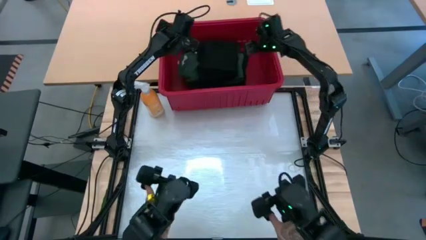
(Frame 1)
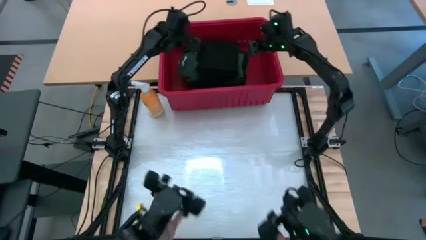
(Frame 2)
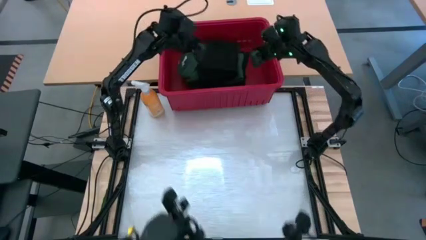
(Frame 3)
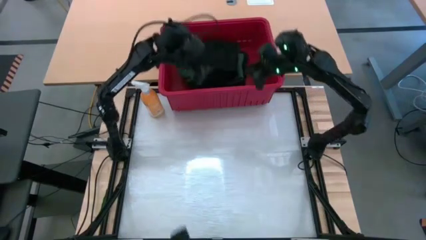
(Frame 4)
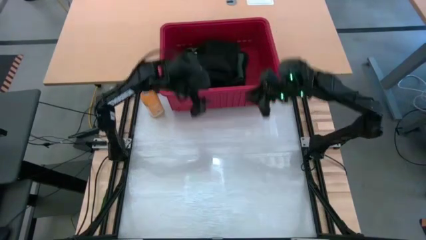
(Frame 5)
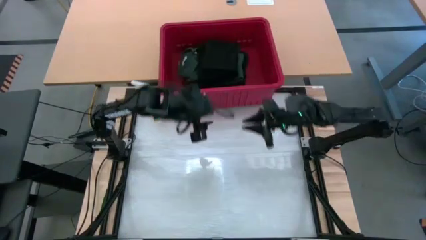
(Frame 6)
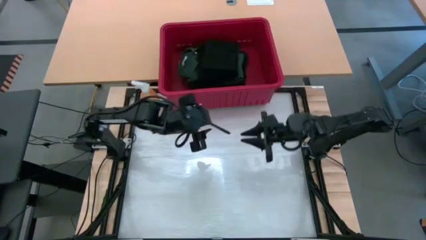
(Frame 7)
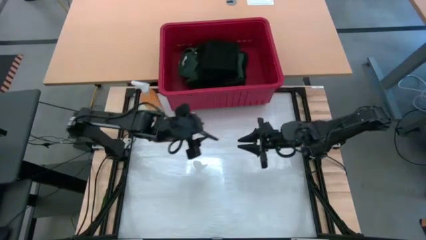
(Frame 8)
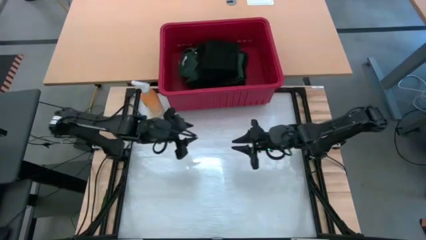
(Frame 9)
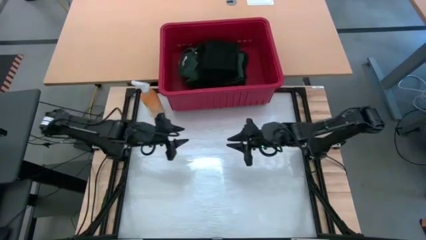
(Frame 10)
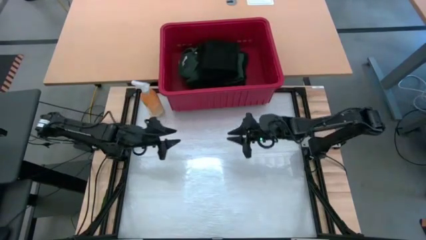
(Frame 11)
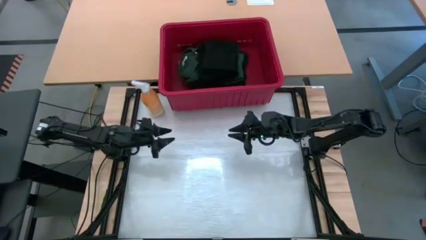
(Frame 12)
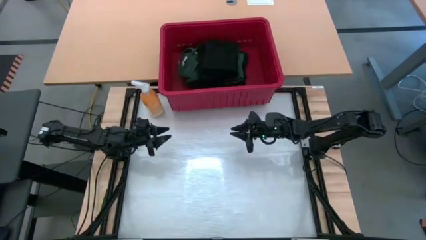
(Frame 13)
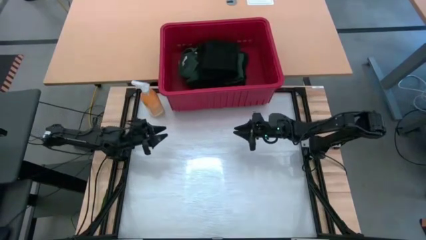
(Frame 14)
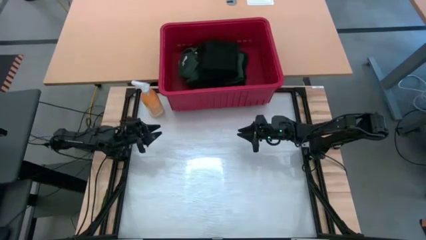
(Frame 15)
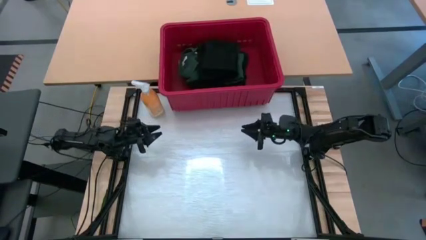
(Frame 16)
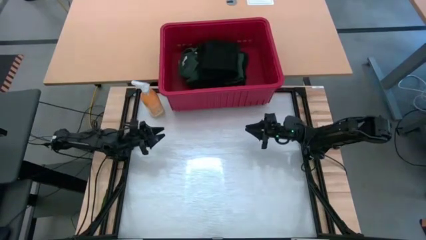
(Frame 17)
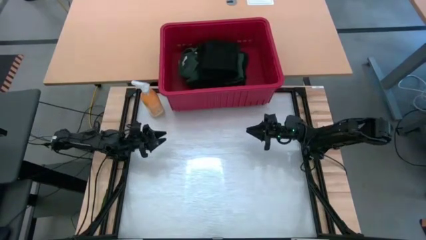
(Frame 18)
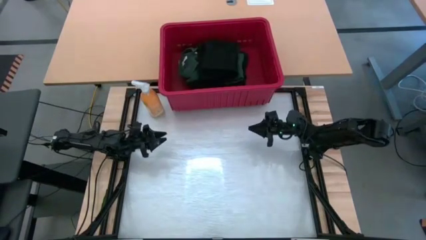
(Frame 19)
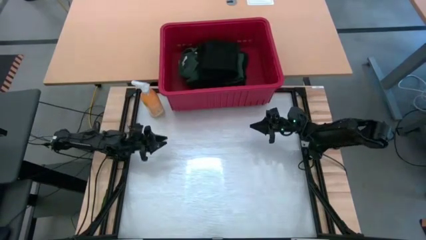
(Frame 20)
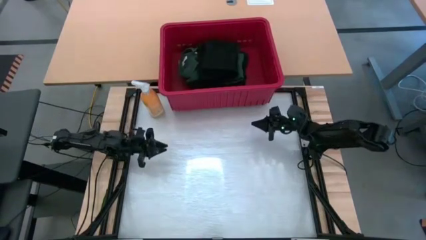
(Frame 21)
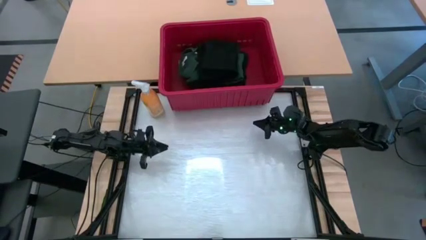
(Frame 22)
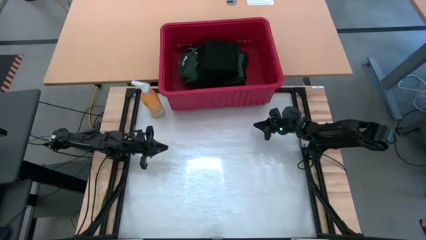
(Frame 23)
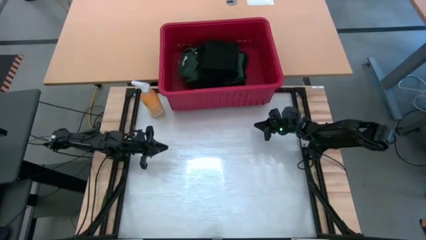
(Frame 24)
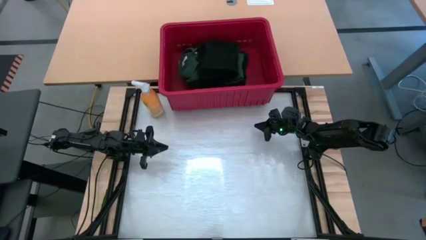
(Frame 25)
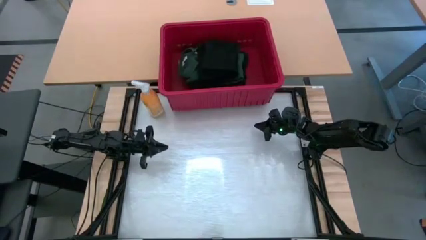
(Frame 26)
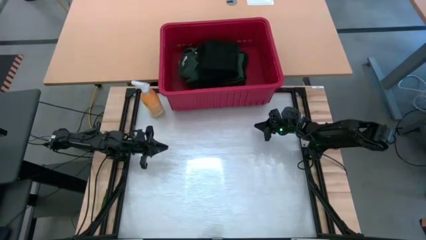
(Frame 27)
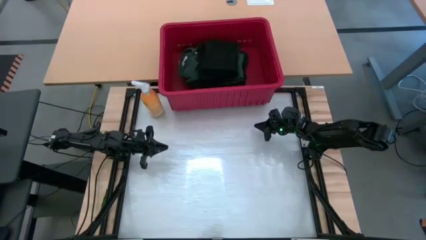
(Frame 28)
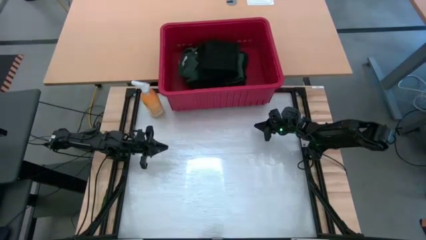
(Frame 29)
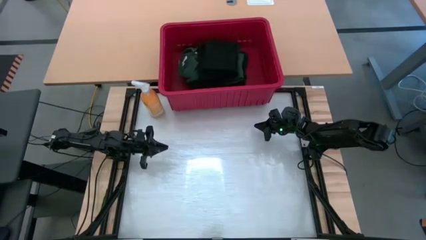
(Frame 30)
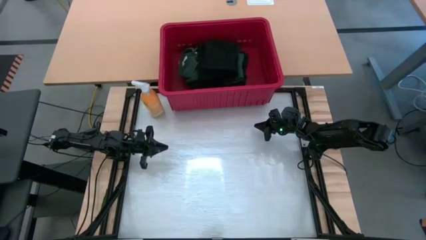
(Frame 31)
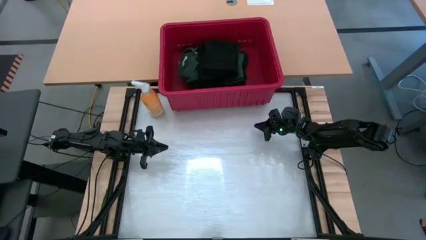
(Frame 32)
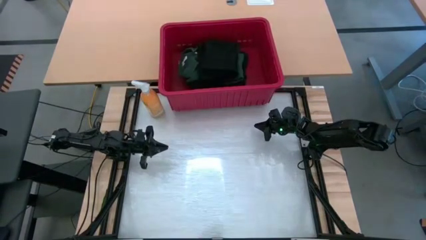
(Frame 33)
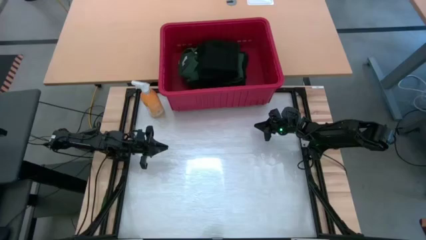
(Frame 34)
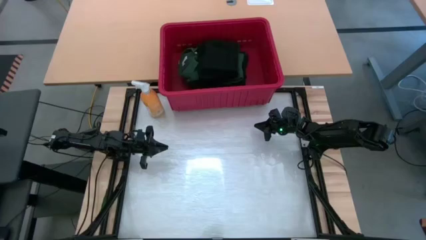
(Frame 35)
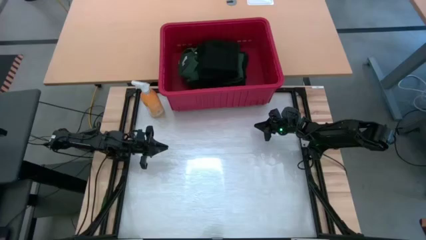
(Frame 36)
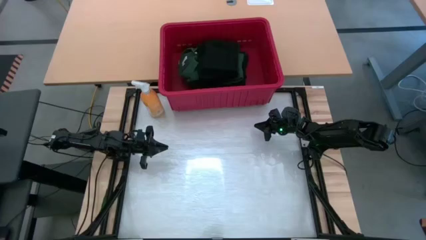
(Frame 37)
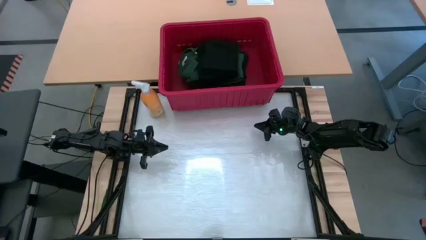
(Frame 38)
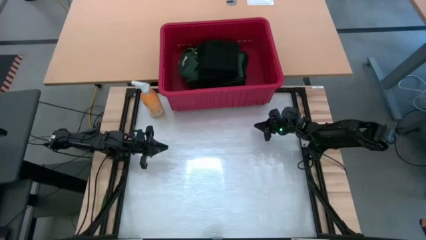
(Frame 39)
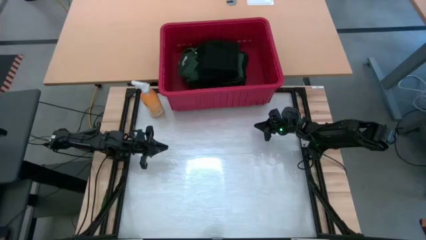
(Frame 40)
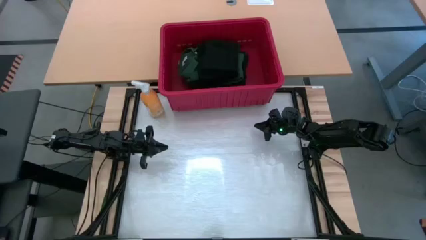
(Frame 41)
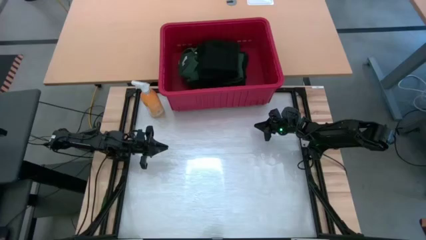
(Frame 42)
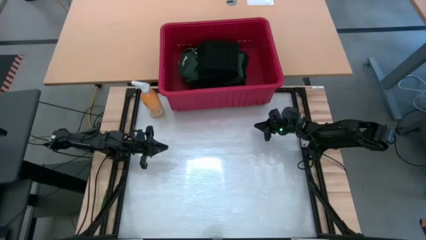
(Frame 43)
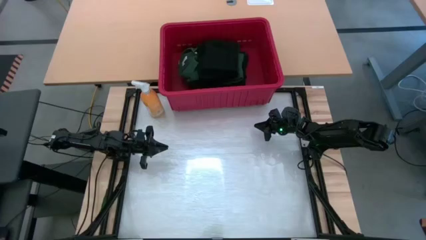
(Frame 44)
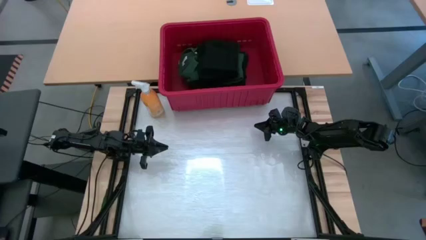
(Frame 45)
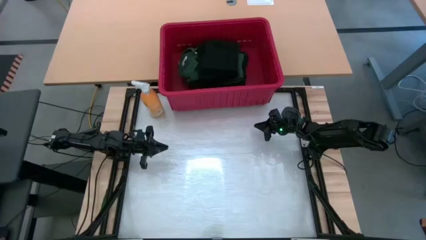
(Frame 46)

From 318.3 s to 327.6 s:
Task: Fold laundry
Return to Home Position

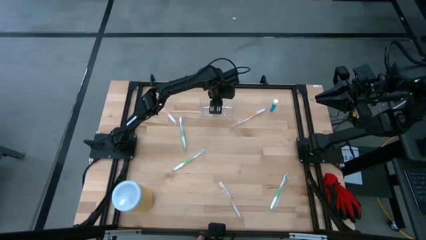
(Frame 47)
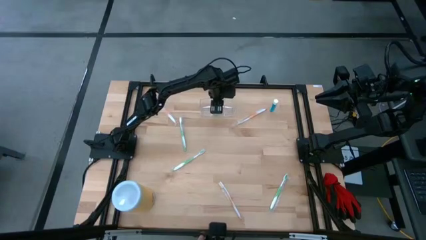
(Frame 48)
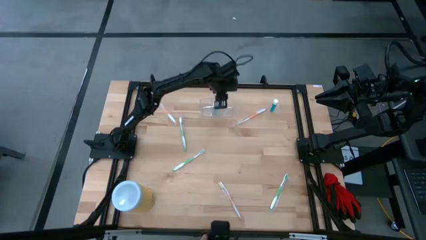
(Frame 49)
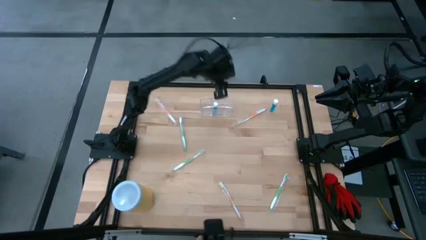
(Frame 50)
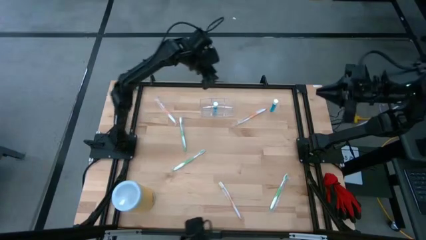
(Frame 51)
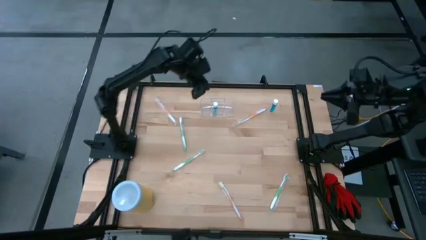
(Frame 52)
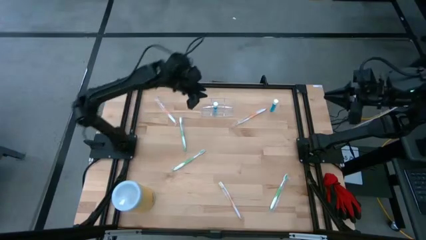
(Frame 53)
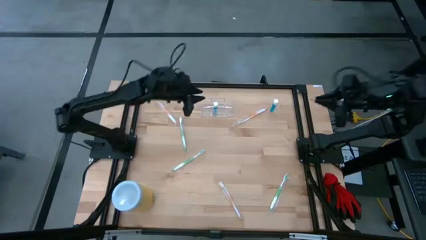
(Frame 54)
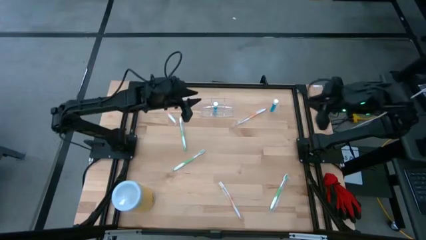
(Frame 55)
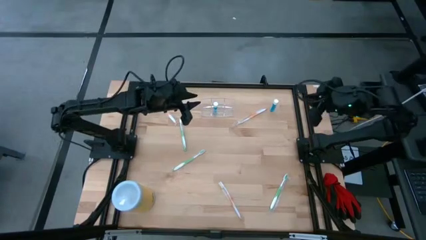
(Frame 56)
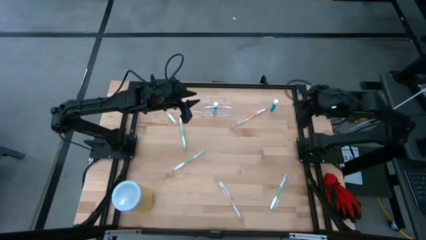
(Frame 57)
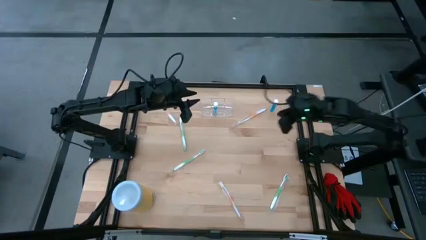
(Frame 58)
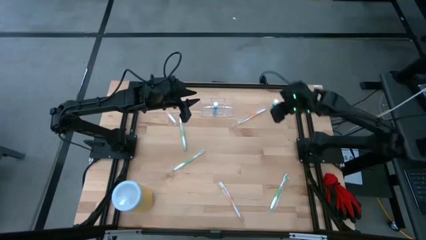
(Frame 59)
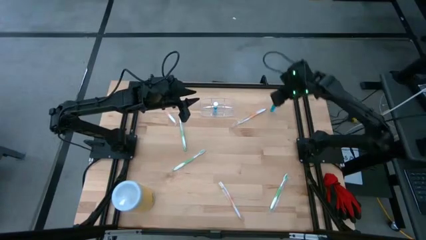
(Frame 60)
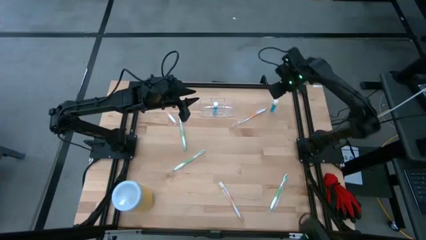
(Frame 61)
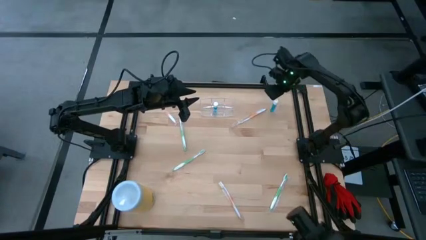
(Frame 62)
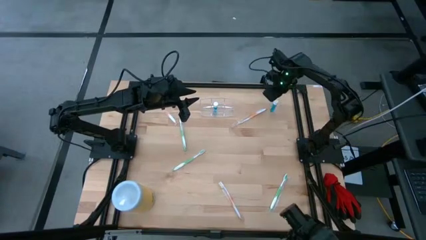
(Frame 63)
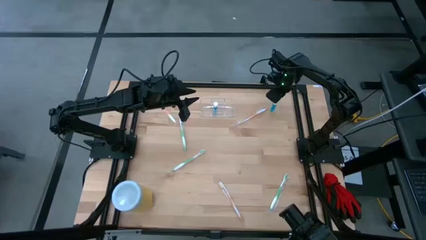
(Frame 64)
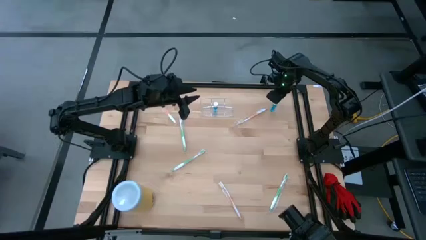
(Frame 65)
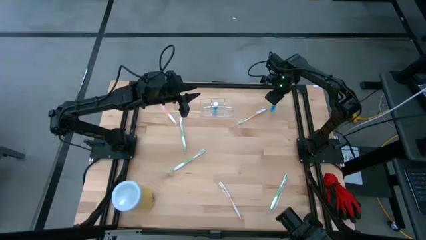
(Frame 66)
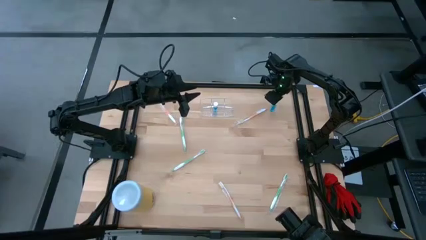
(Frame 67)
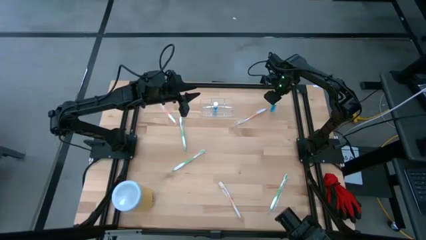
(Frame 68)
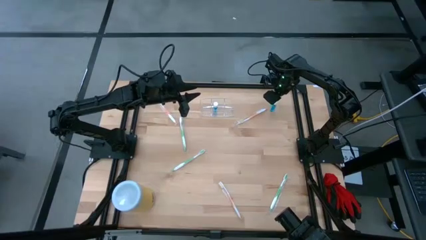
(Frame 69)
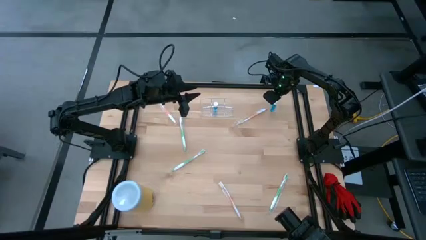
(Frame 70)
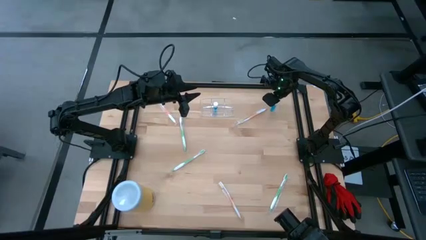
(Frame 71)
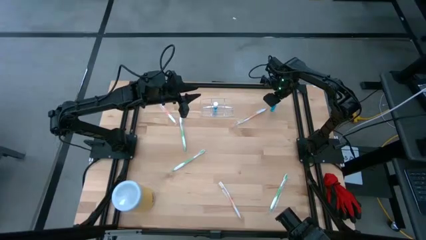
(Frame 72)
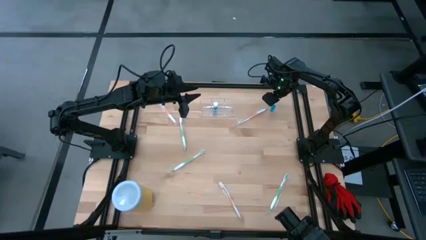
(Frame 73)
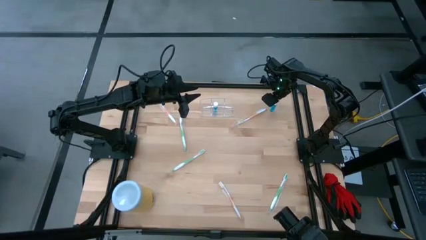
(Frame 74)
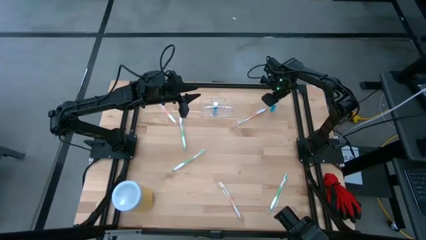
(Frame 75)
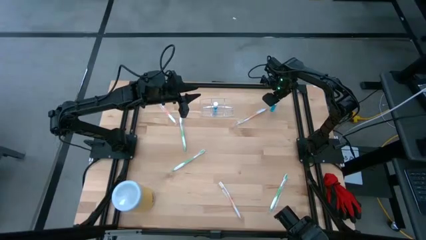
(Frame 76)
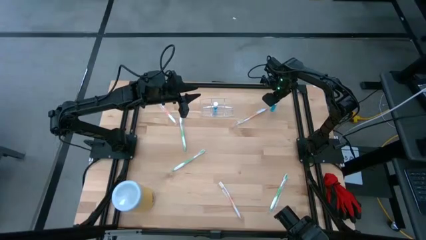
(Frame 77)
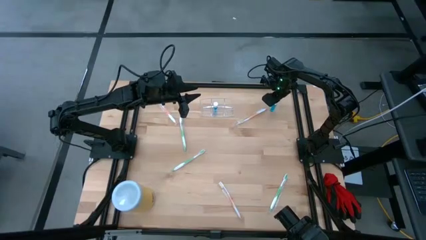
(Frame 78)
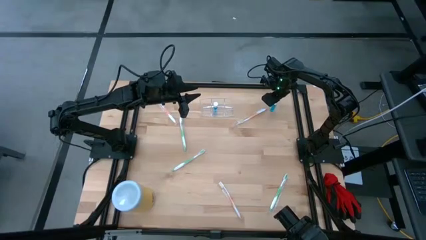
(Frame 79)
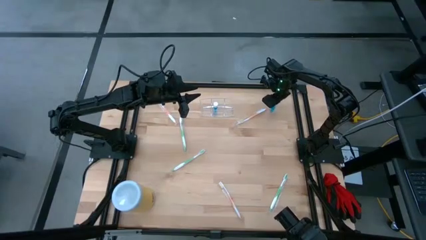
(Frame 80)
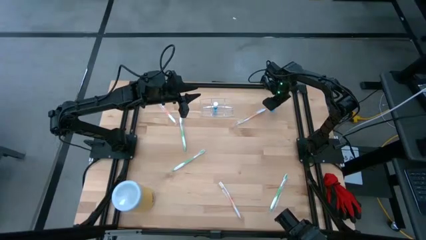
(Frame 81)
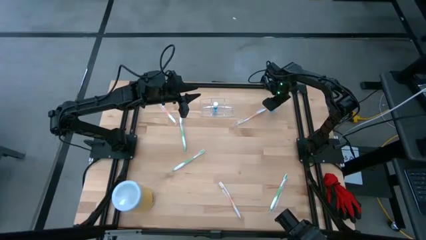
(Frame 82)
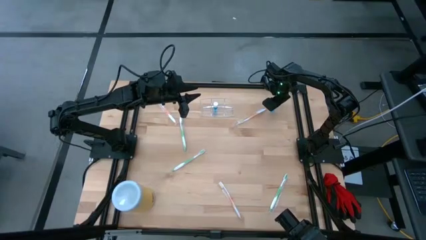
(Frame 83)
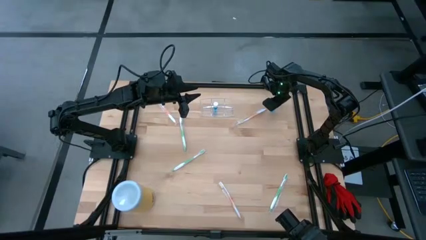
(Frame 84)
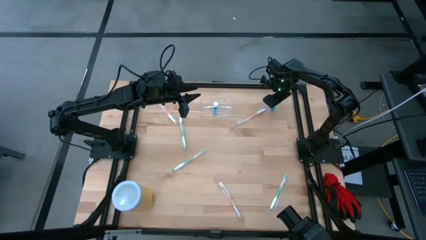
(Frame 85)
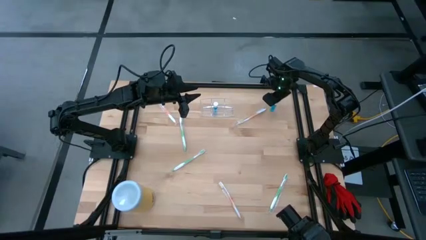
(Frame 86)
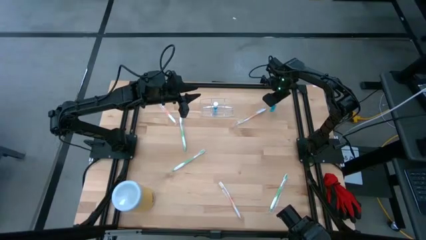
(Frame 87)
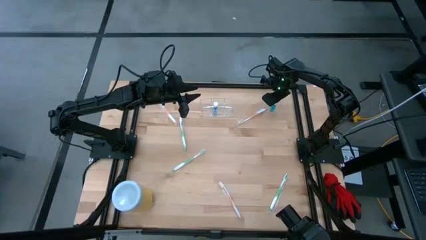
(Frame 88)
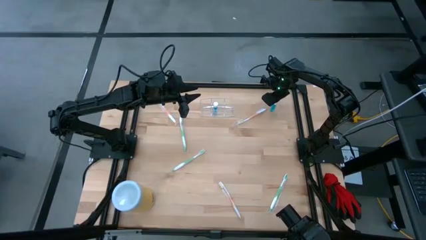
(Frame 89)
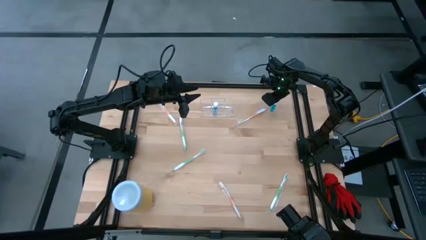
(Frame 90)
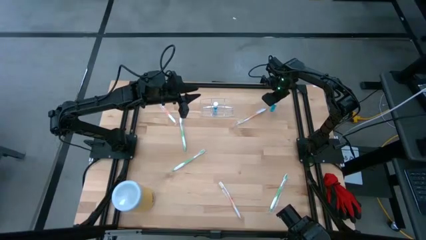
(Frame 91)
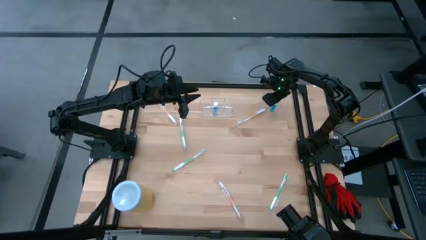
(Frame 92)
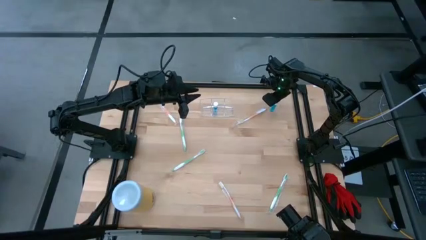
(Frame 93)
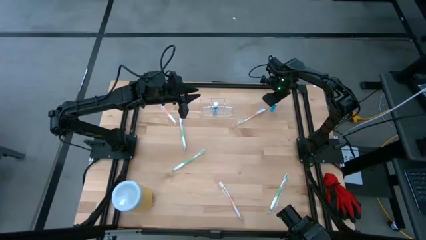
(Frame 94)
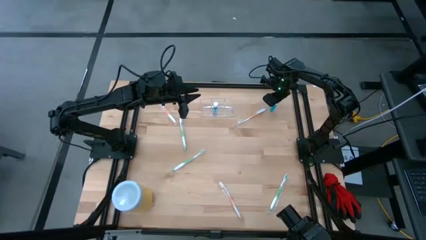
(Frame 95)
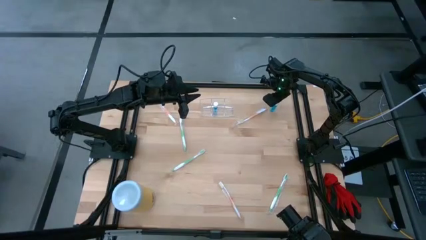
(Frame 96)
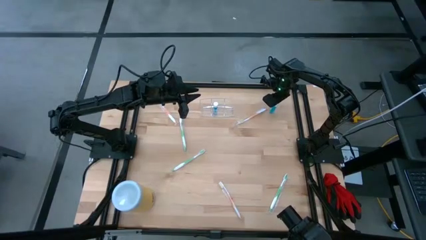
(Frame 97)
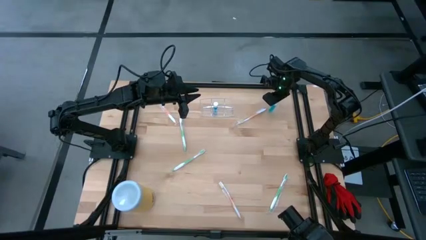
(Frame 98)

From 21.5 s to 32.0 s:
Task: Pick & Place toothbrushing station
Put the blue mouthwash into the transparent organizer
